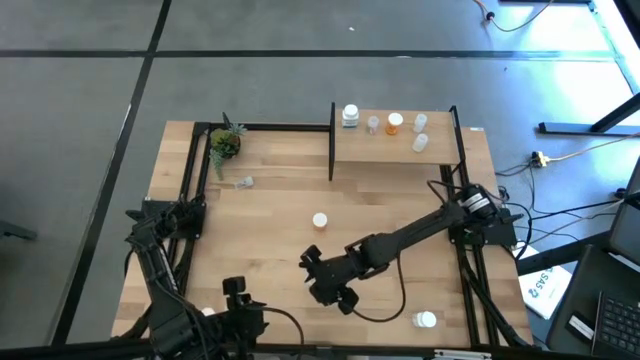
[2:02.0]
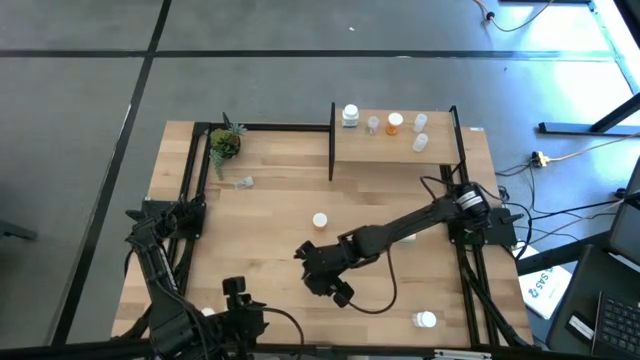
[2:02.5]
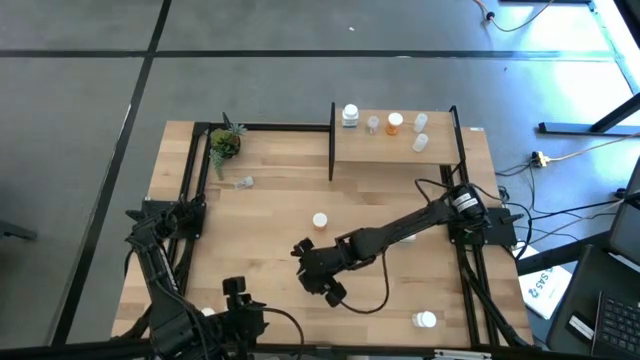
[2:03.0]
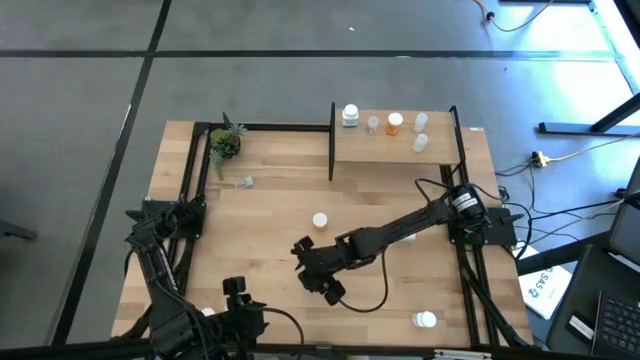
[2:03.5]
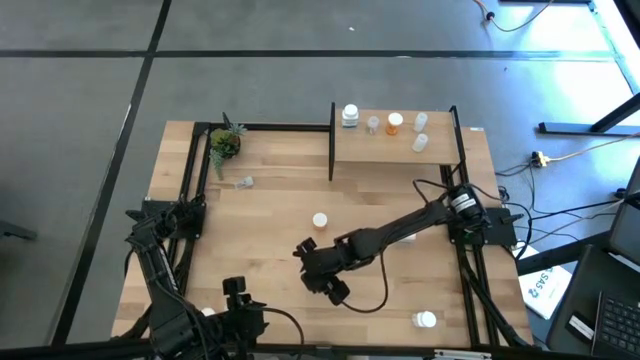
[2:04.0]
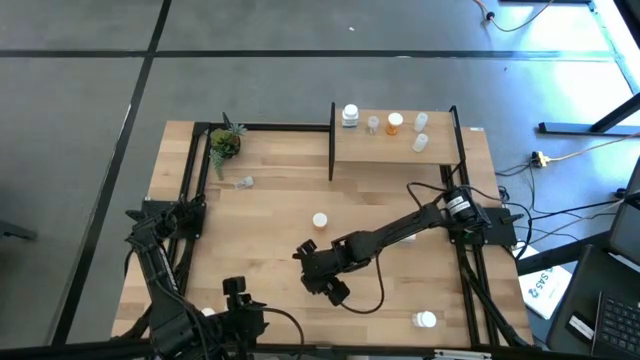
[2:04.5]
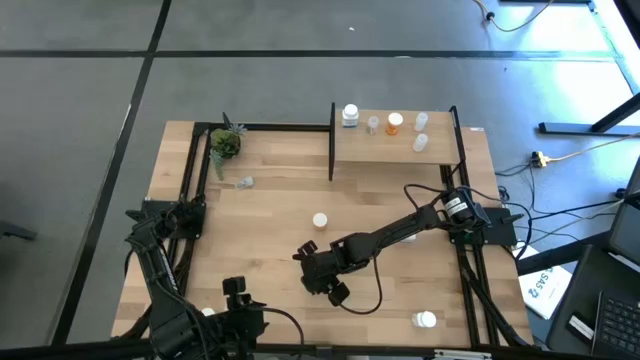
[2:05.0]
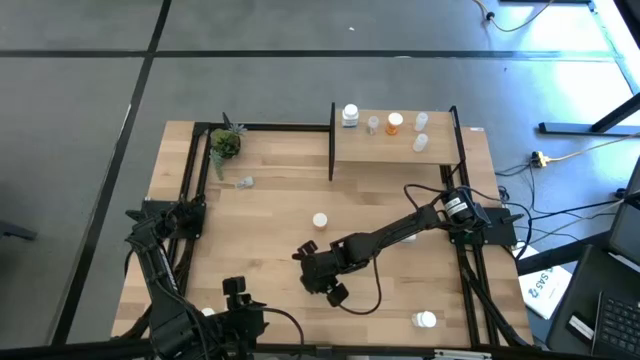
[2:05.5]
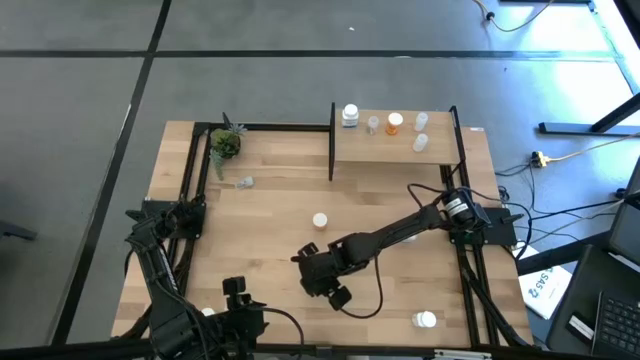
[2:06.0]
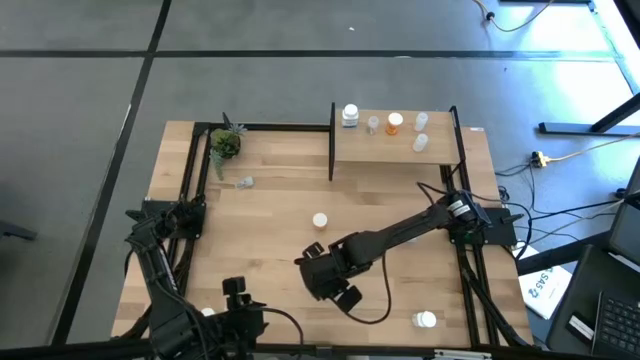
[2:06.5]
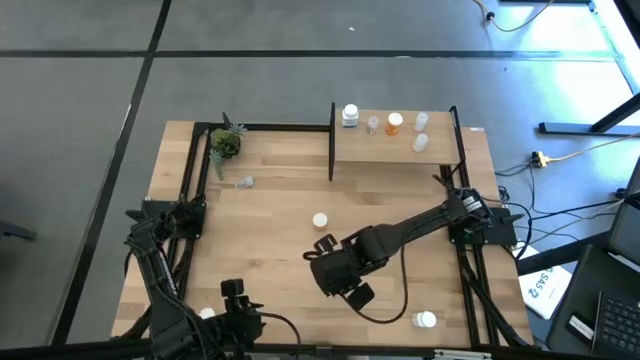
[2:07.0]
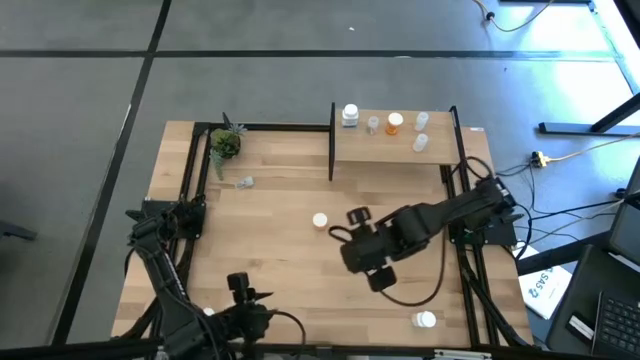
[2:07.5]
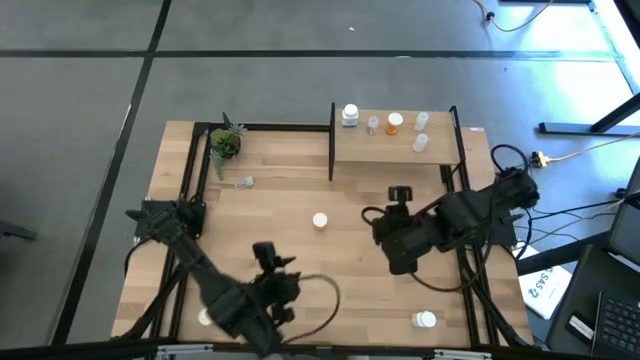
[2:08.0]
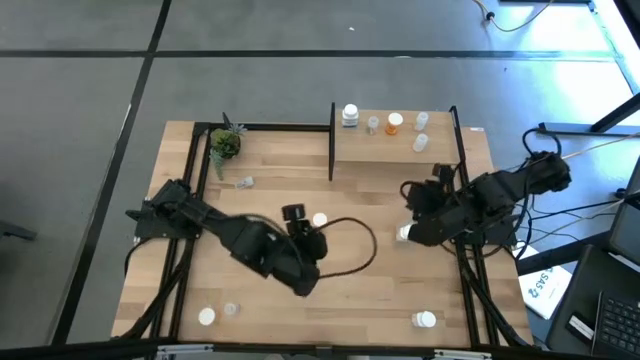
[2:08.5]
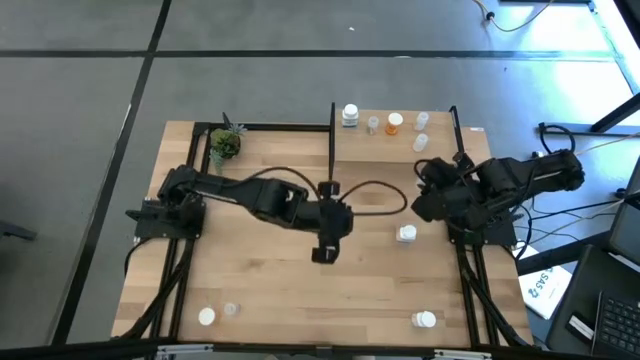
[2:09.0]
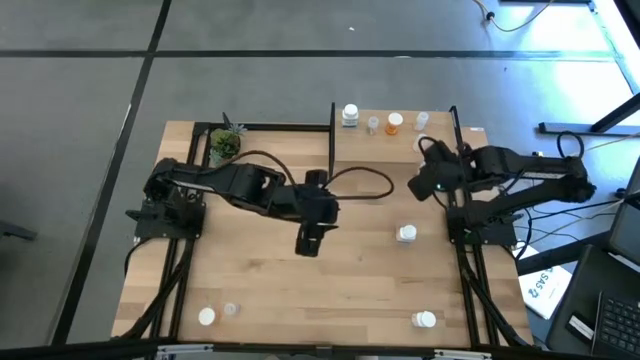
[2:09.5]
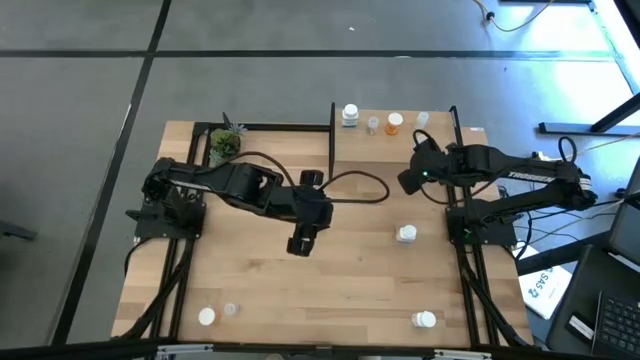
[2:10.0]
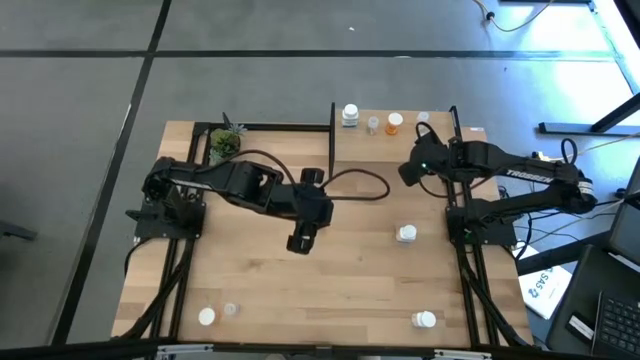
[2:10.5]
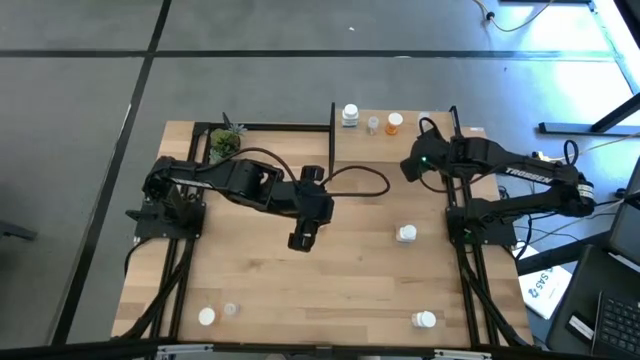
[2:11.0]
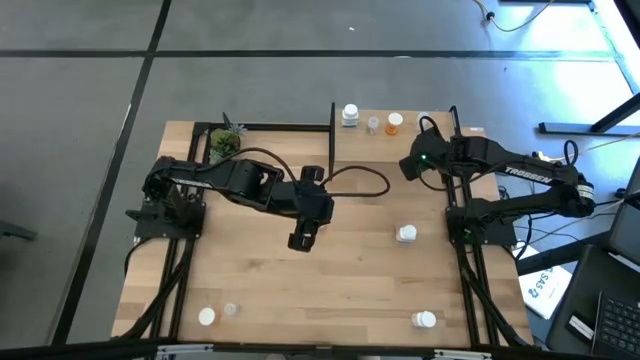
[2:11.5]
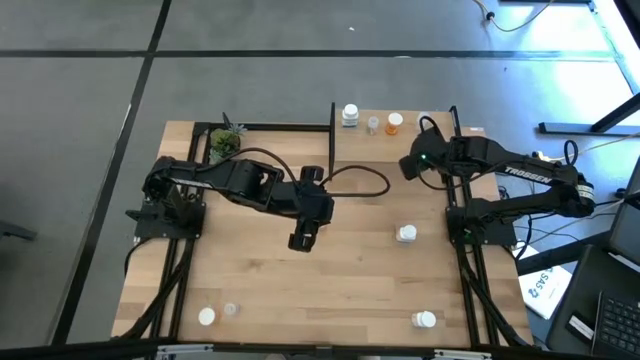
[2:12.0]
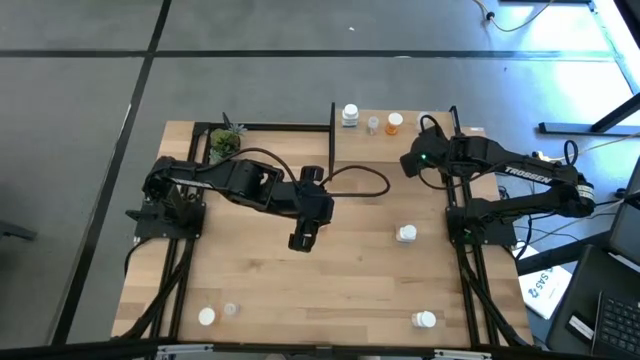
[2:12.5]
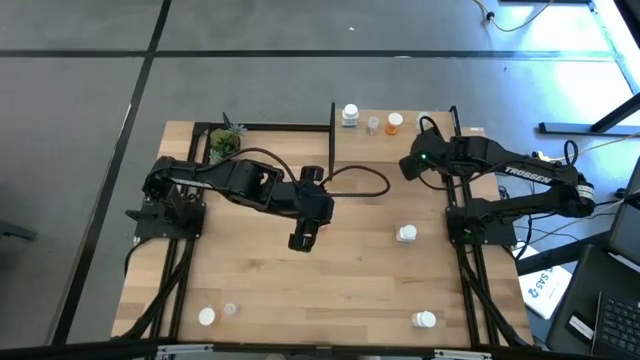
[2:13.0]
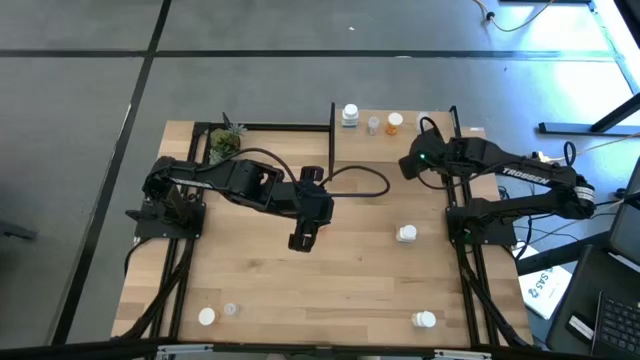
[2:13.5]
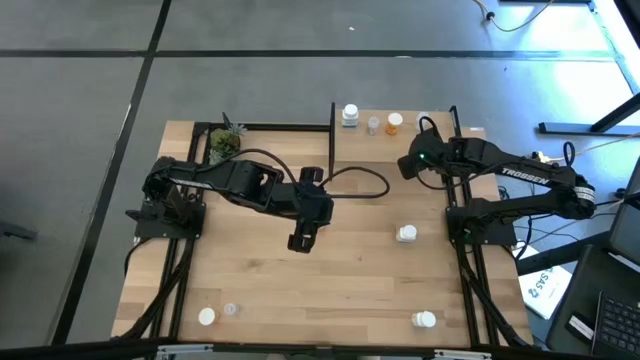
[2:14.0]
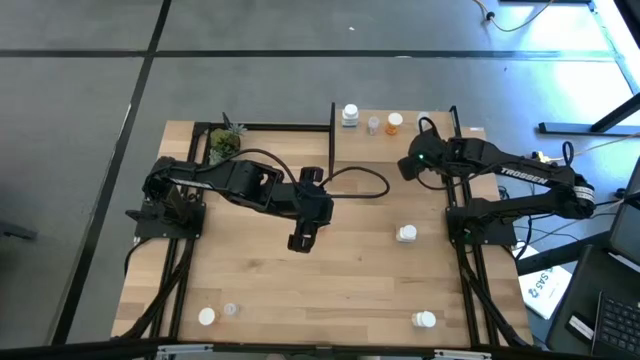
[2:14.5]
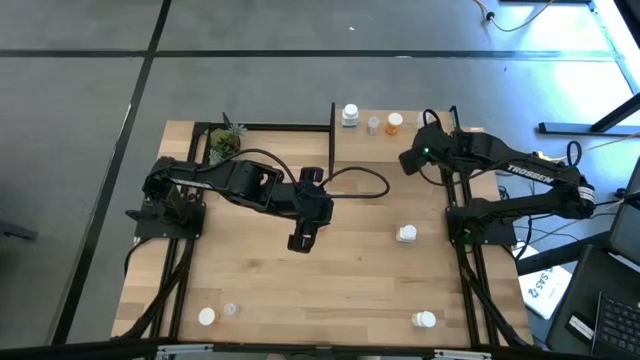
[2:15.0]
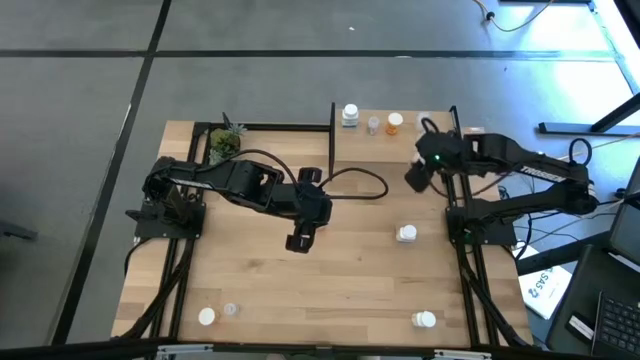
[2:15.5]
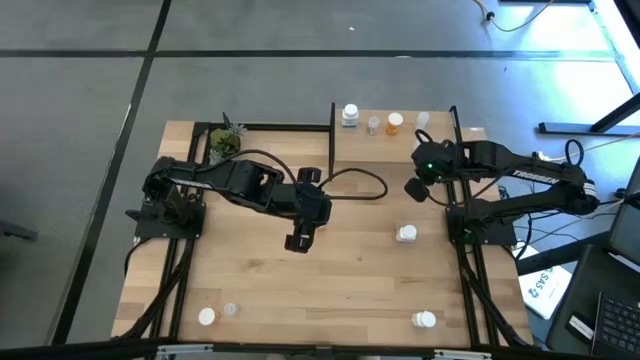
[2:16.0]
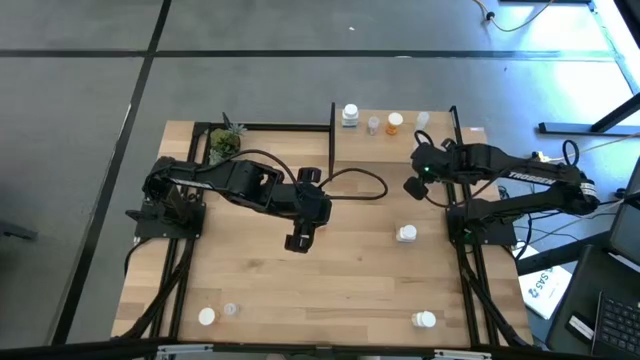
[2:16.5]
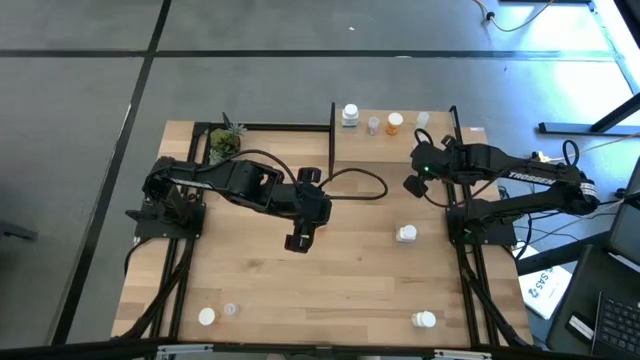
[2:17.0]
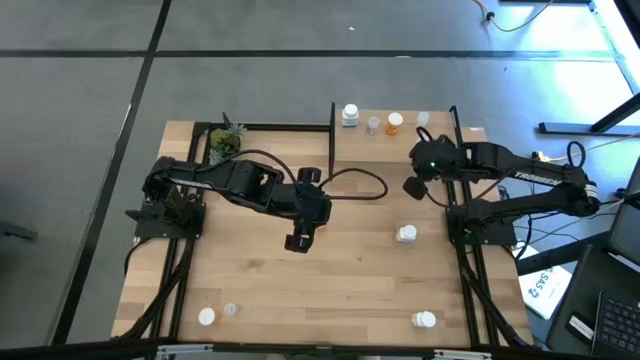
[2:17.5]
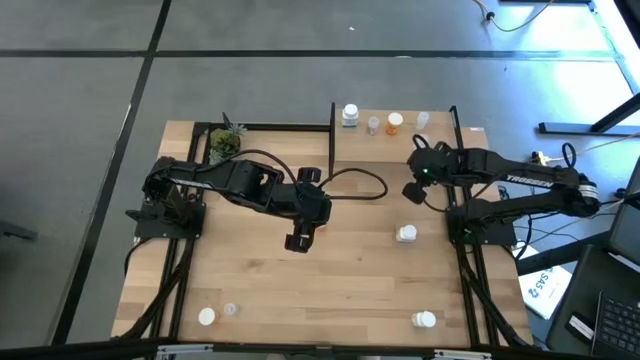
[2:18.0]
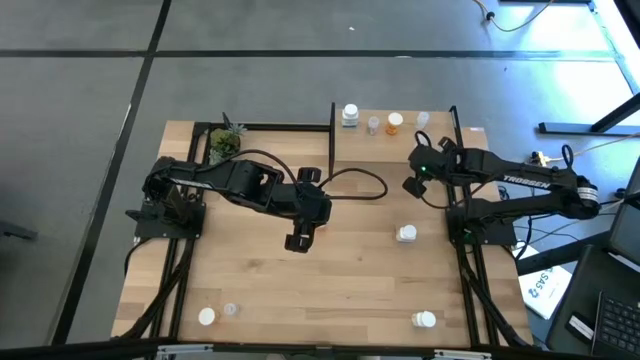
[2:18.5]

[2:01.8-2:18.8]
Task: Pick and place medicine bottles onto shelf by color
Put the yellow transparent pill bottle on the shelf aligned with the other yellow transparent pill bottle

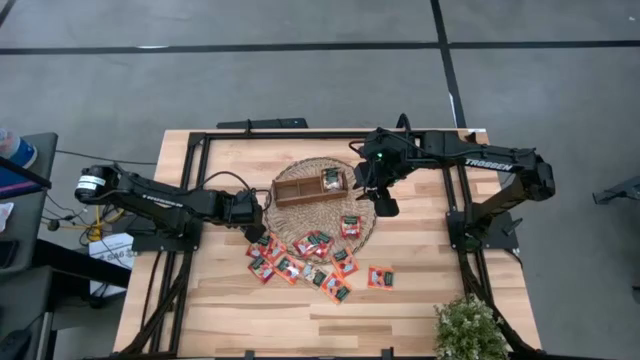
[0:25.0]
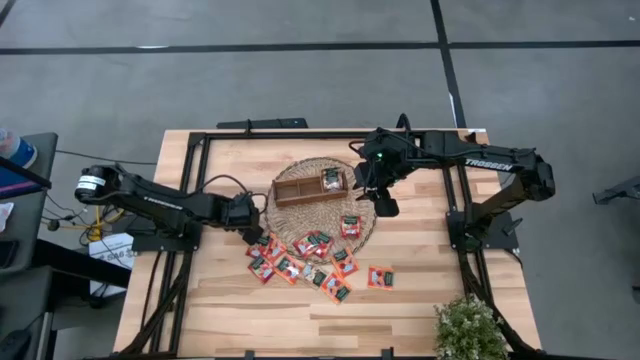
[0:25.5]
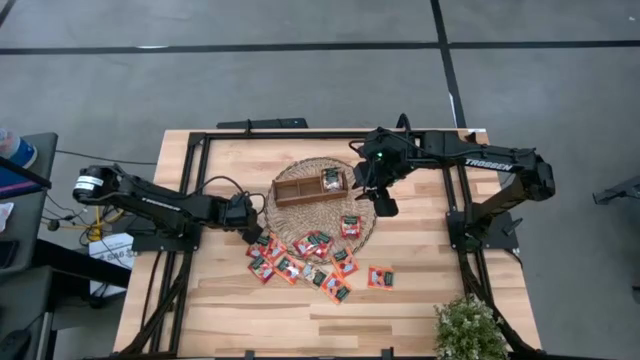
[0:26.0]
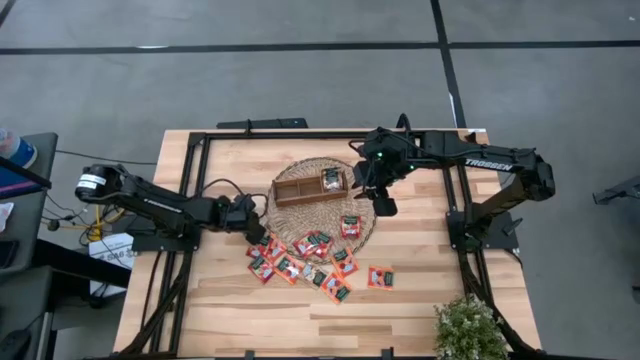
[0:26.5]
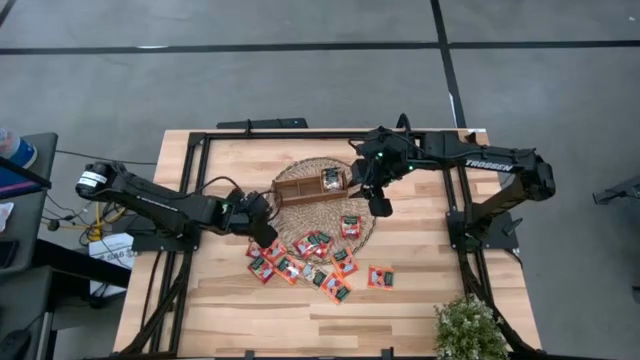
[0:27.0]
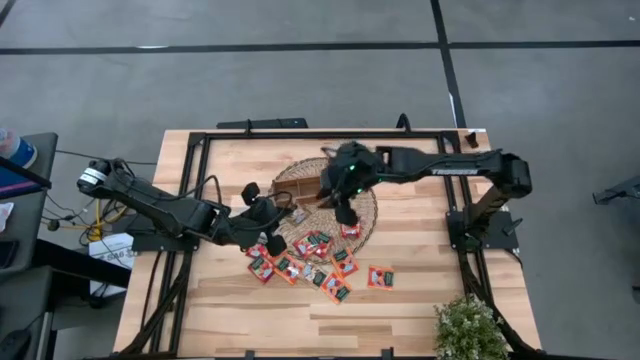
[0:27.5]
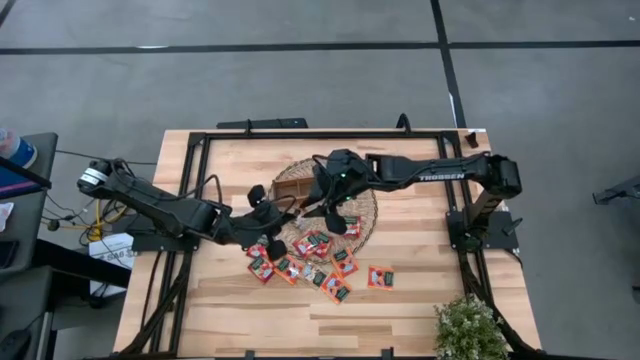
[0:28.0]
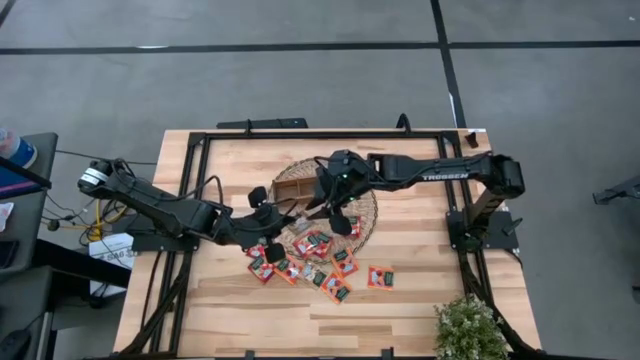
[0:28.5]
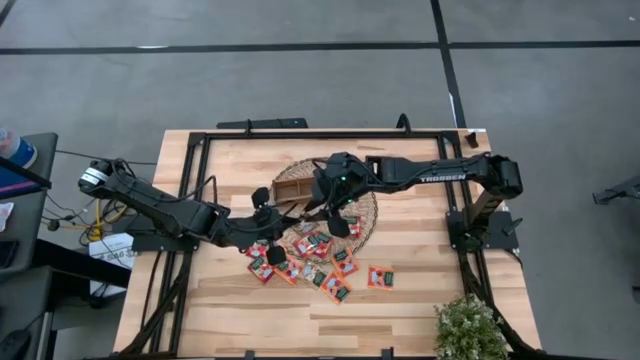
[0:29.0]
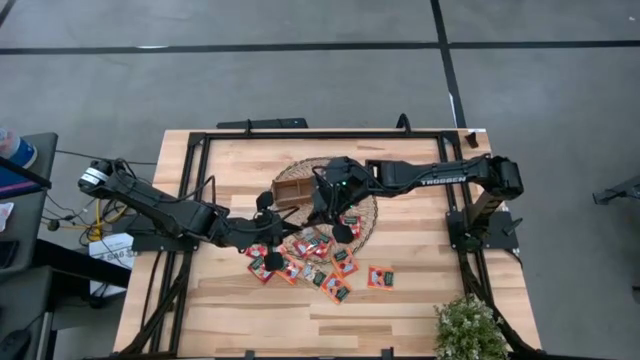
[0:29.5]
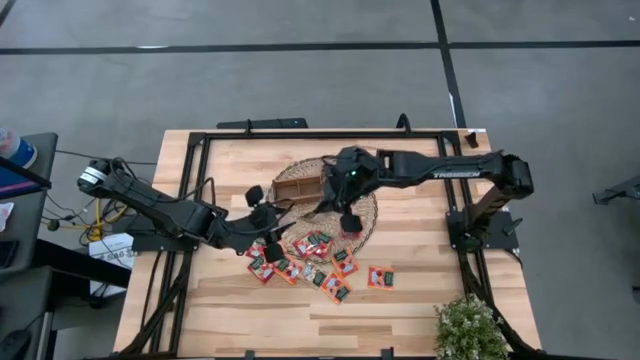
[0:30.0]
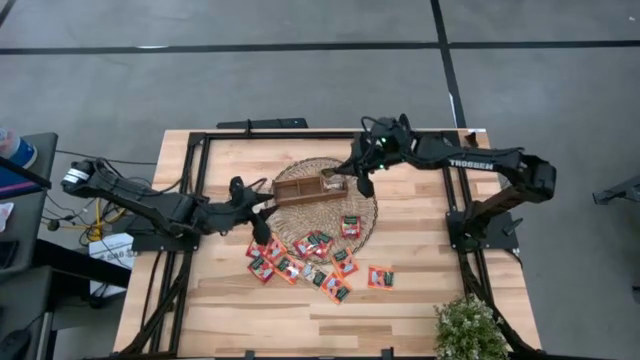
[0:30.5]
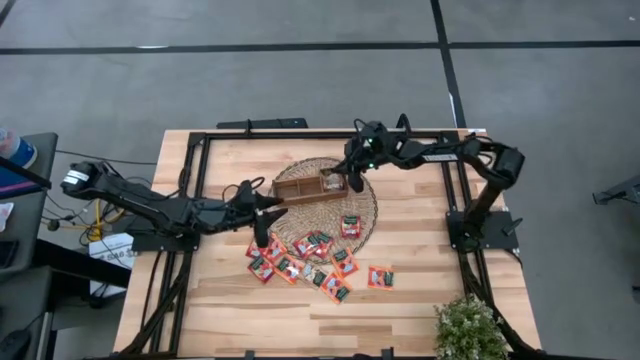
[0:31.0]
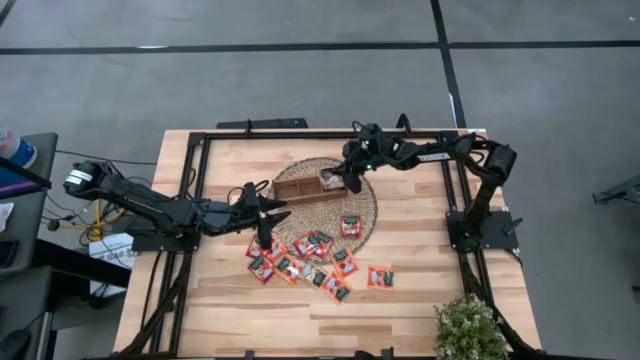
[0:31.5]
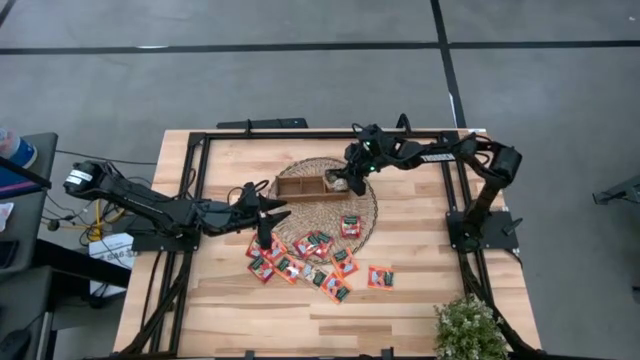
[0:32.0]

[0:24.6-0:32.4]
Task: Pick & Place Tea
Put the left brown tea bag into the right section of the wooden organizer
